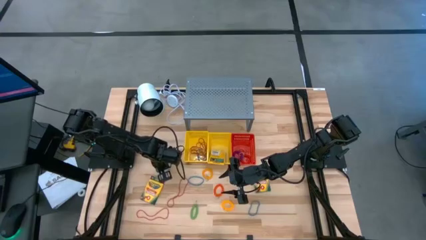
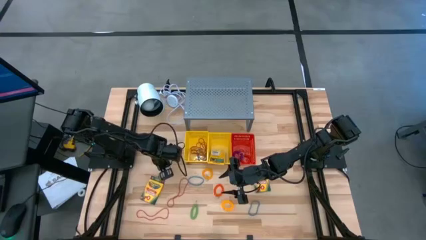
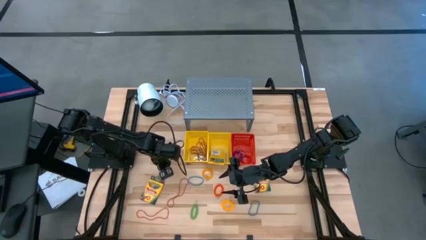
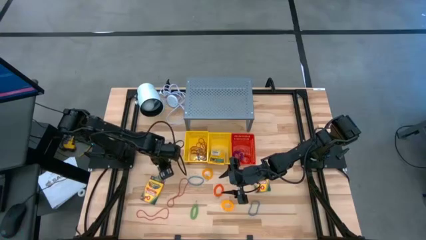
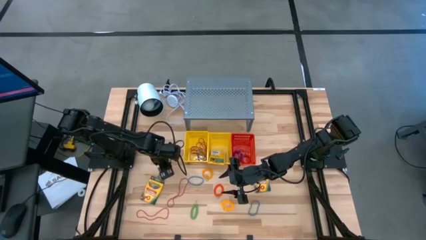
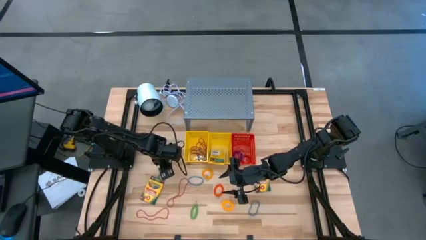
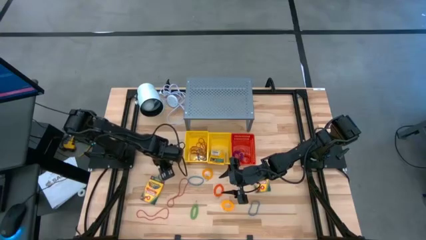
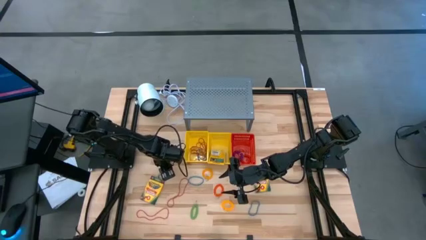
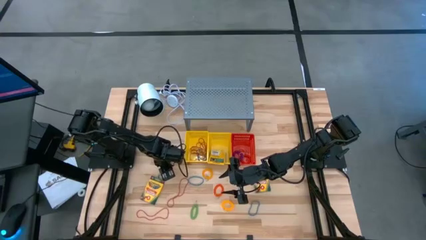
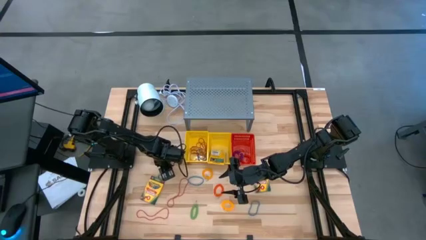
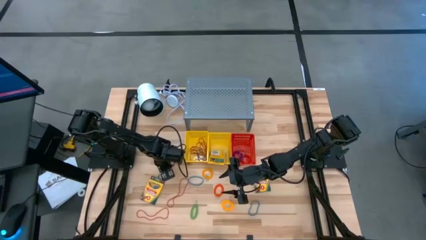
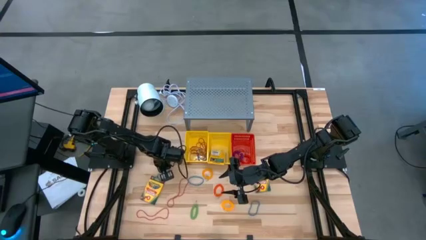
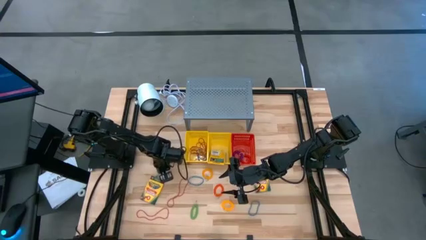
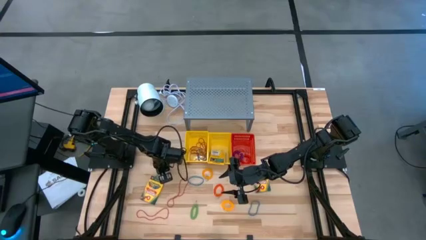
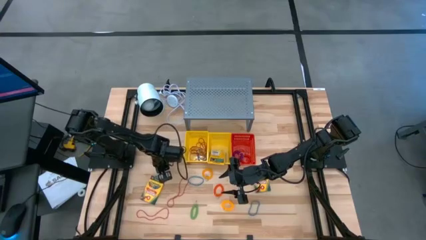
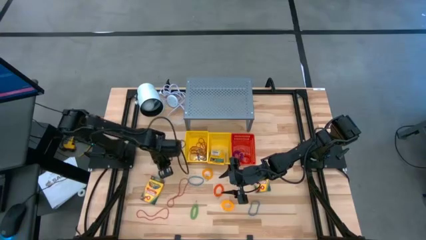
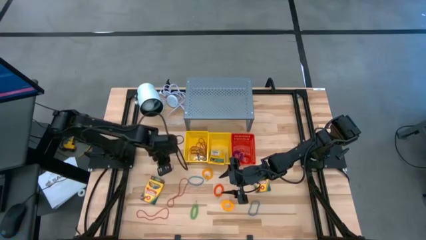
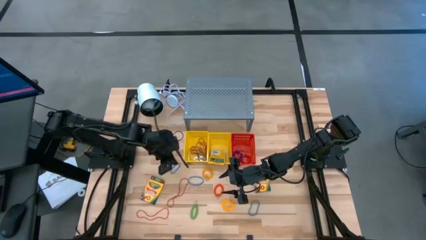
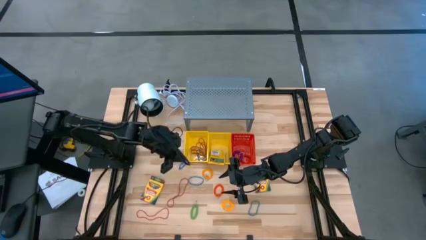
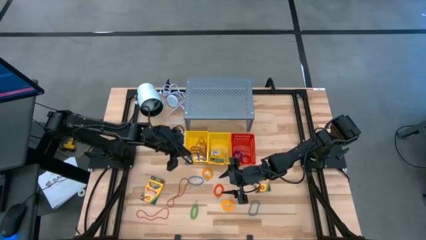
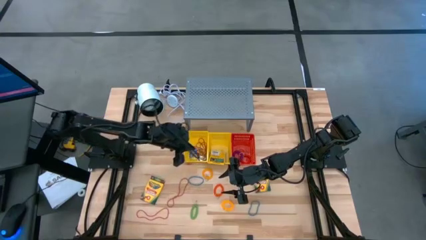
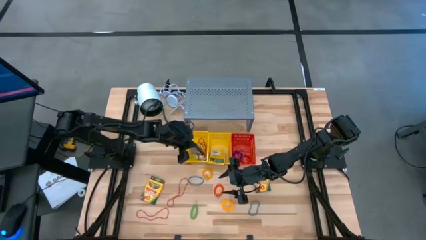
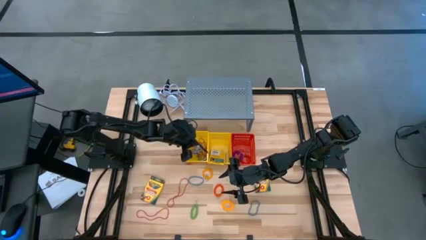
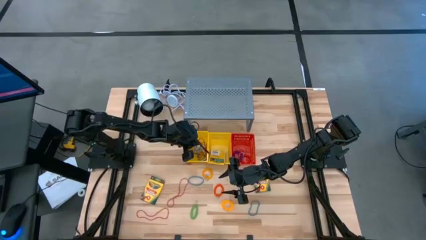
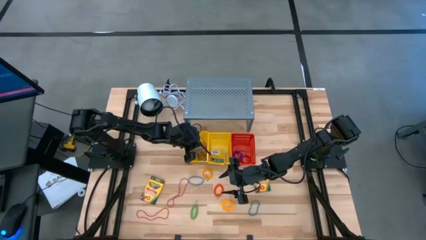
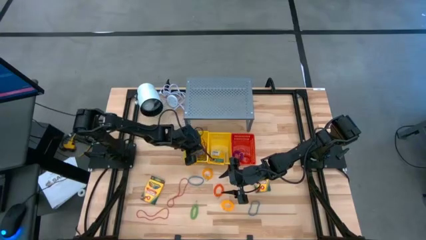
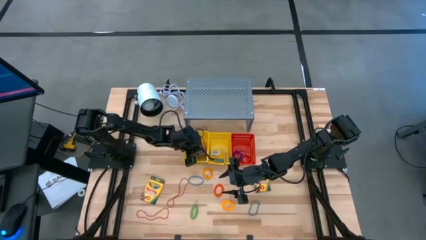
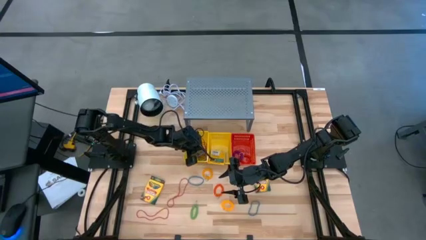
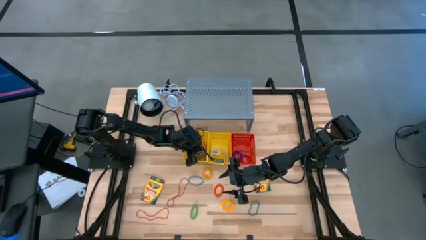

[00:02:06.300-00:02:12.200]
Task: Pick & Place Office Desk Supplies
Put the blue rubber band into the left yellow basket

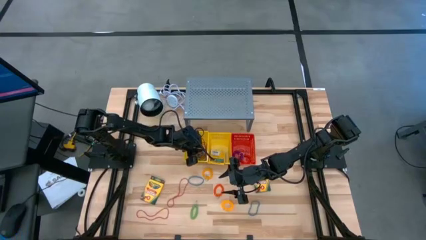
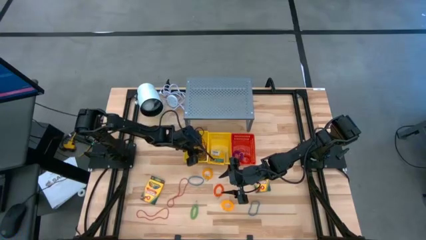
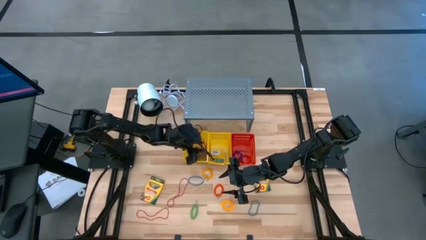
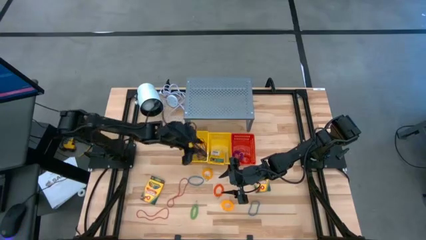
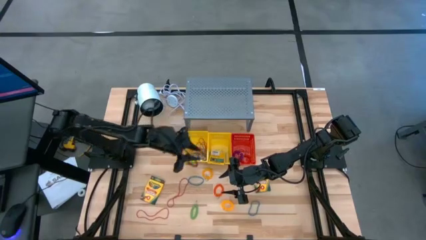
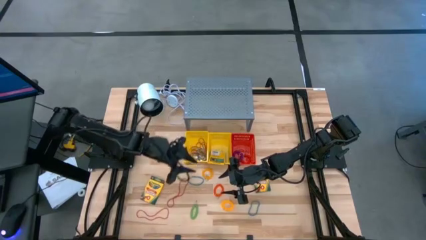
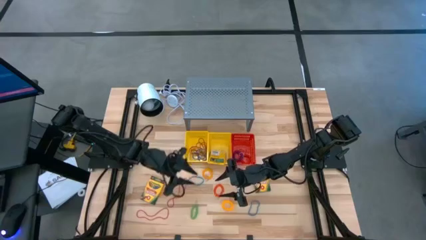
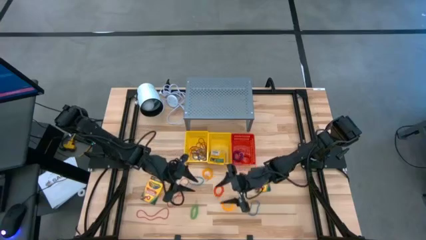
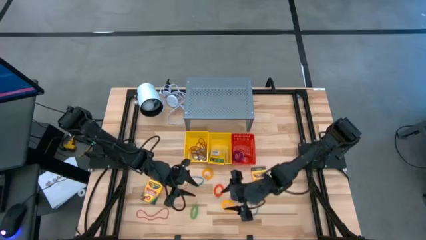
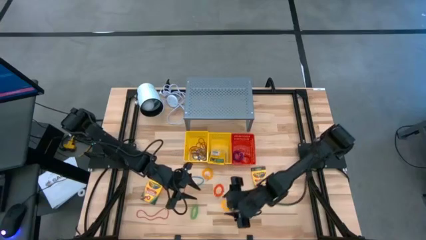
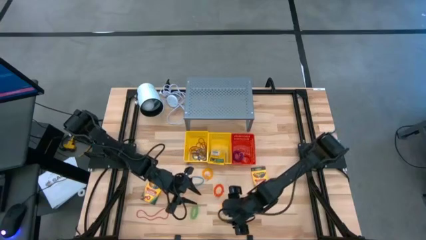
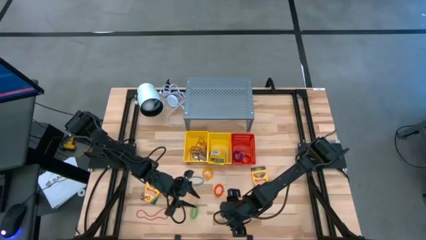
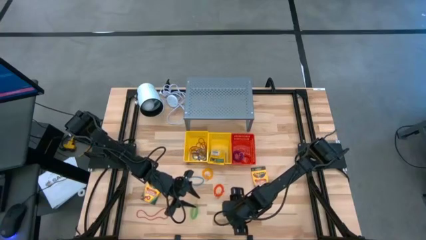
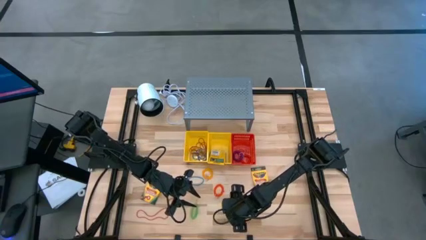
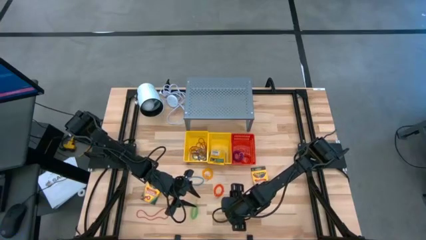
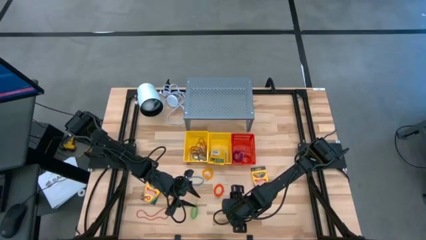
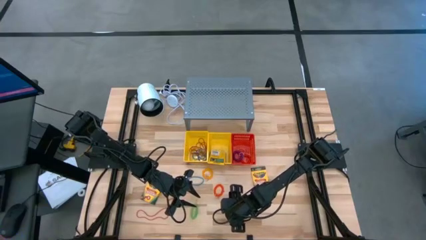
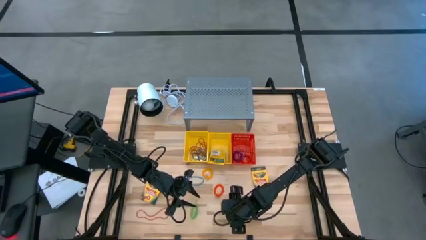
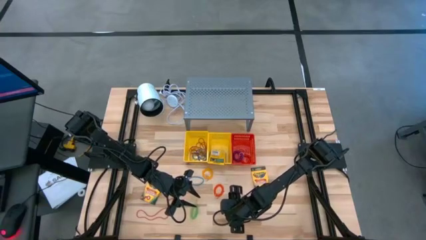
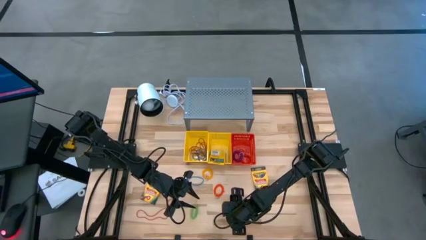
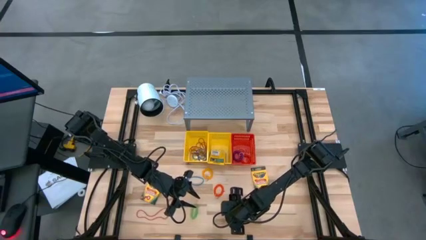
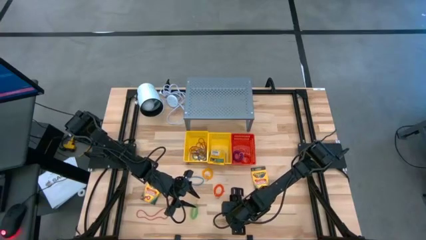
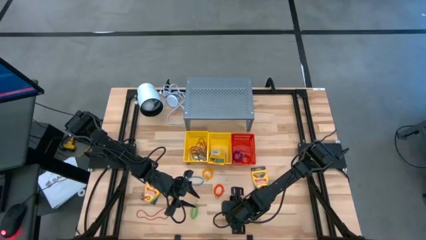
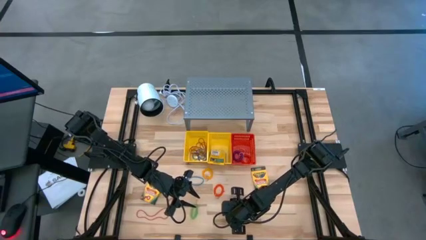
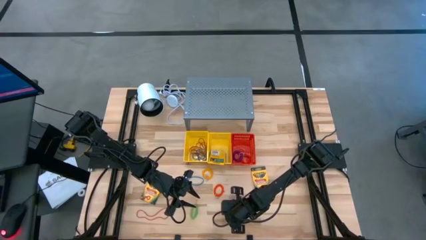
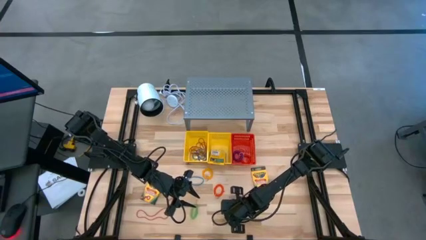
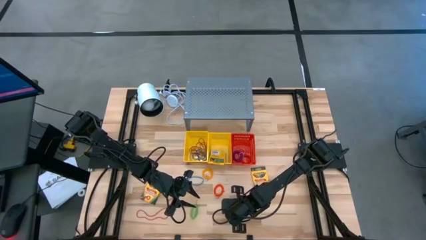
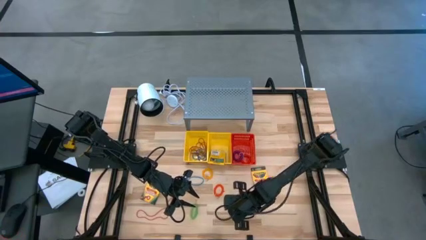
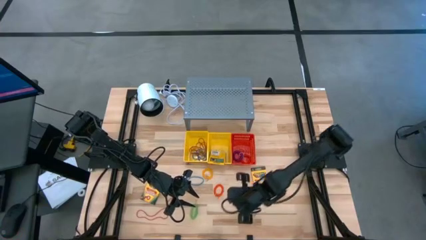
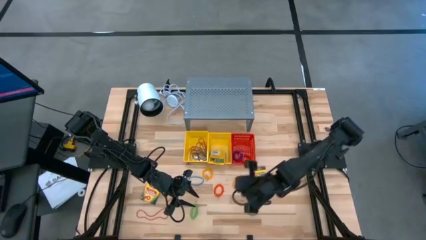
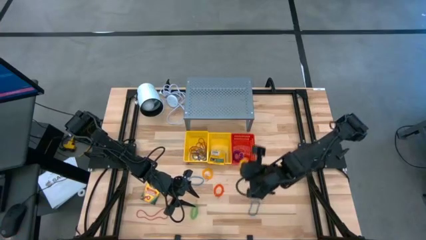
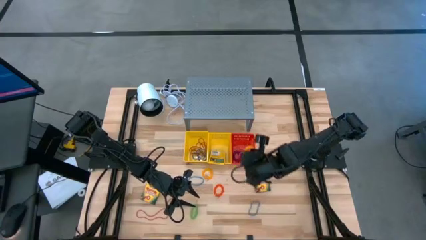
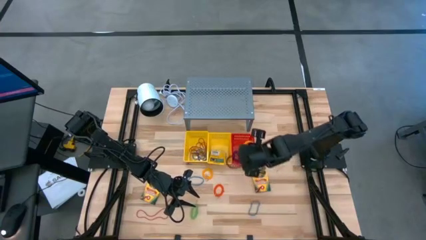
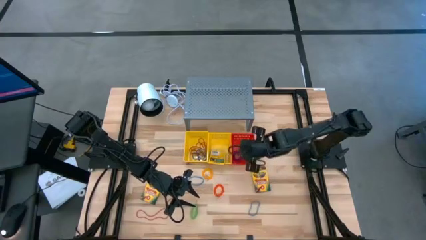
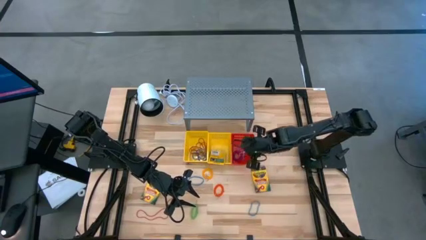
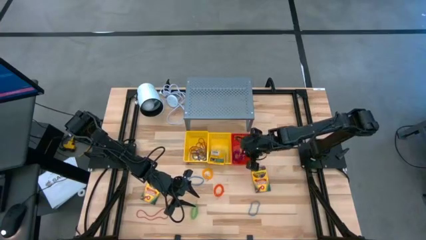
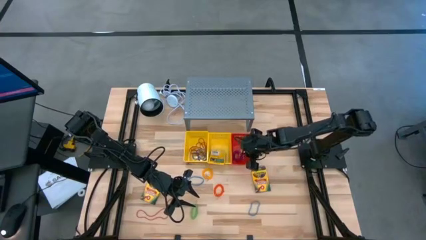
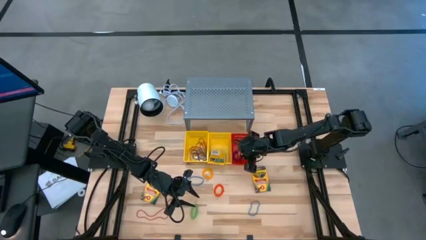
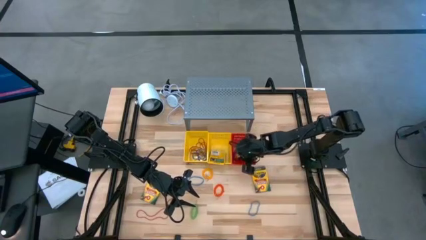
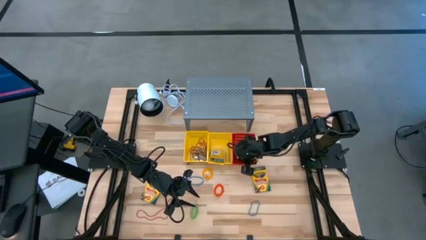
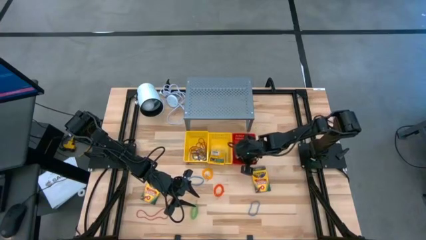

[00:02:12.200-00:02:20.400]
Put the yellow spring keychain into the red basket
